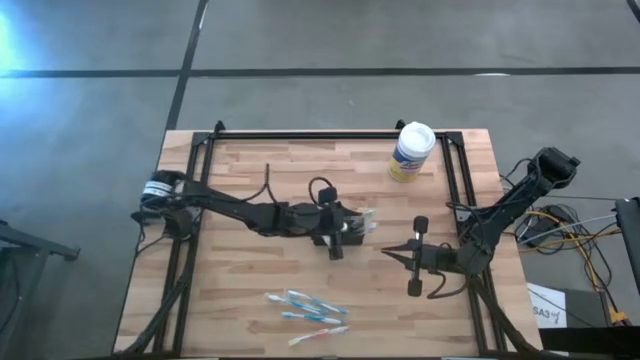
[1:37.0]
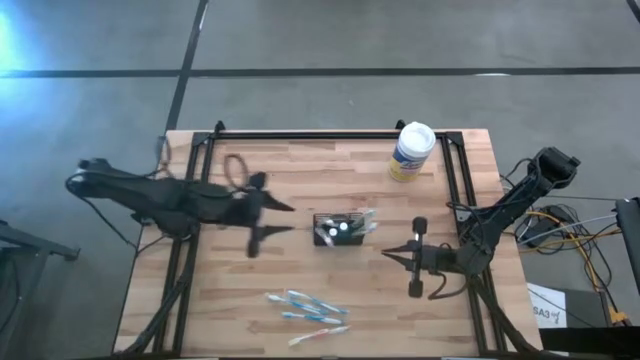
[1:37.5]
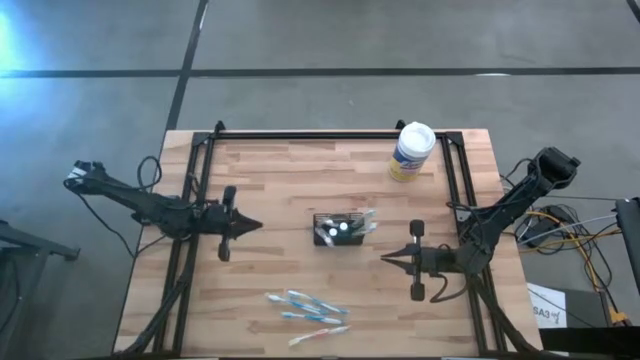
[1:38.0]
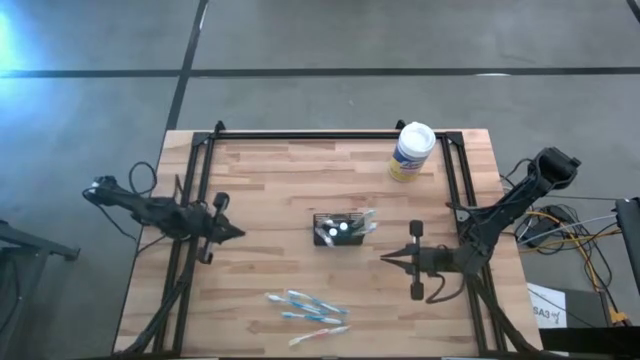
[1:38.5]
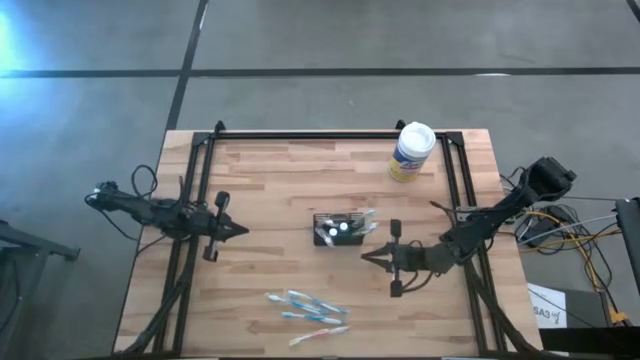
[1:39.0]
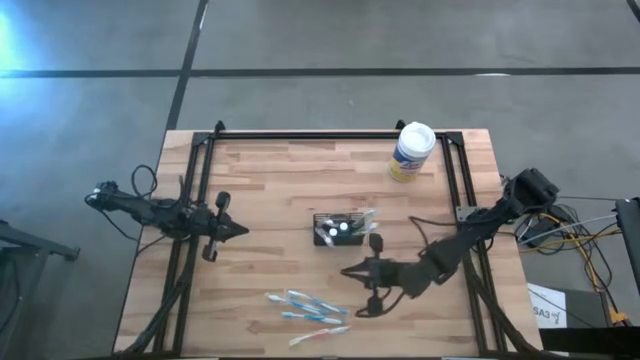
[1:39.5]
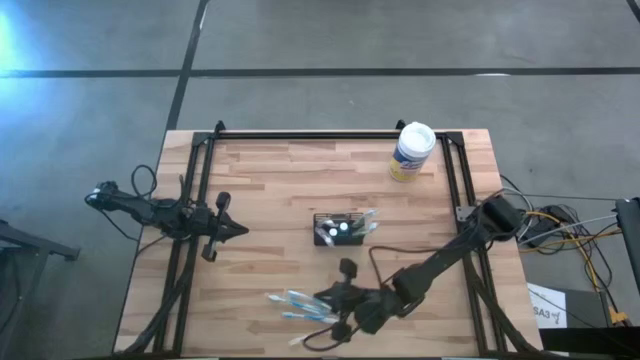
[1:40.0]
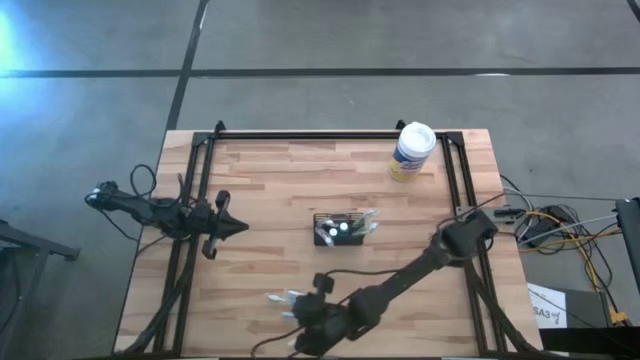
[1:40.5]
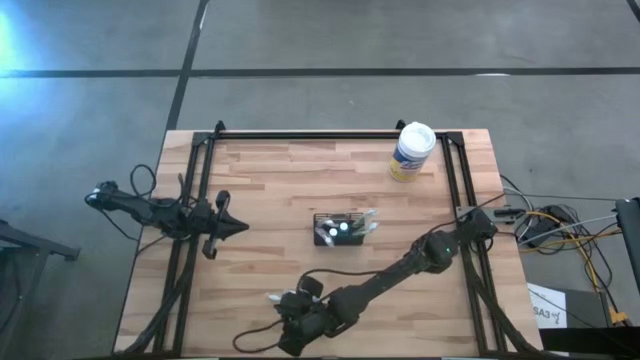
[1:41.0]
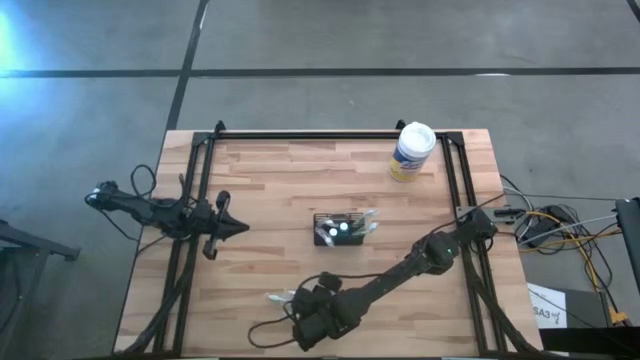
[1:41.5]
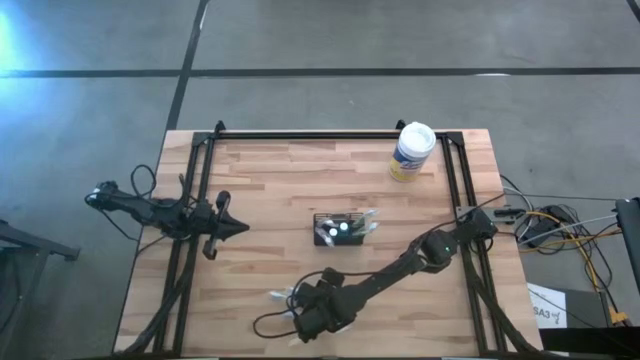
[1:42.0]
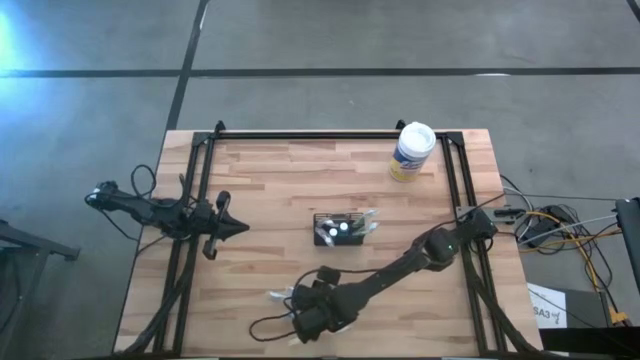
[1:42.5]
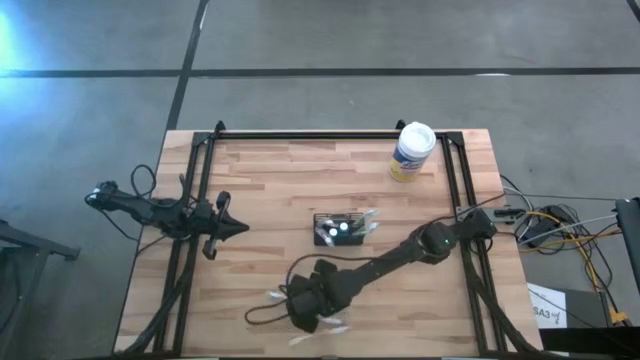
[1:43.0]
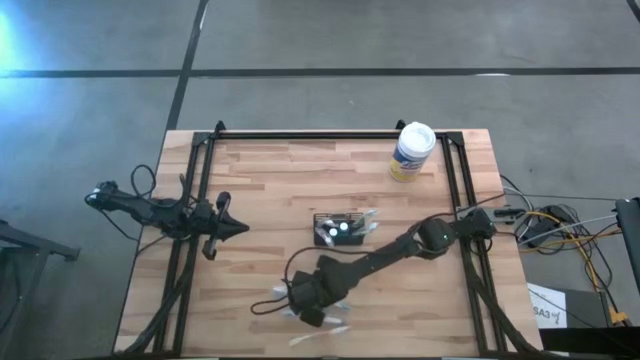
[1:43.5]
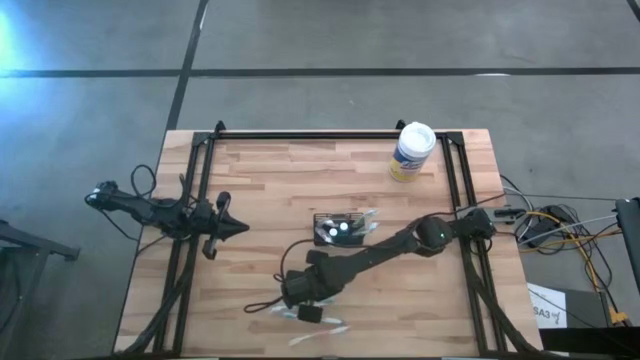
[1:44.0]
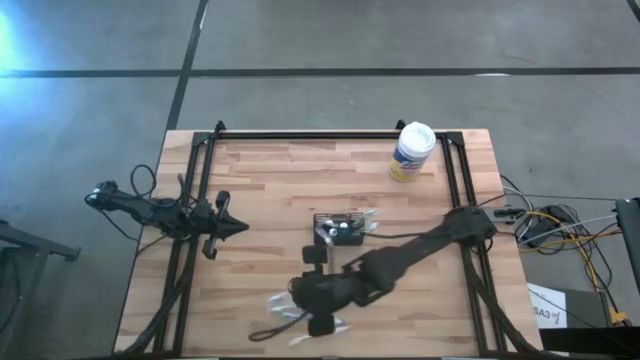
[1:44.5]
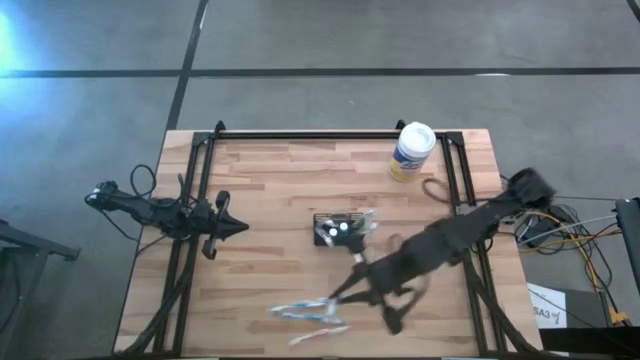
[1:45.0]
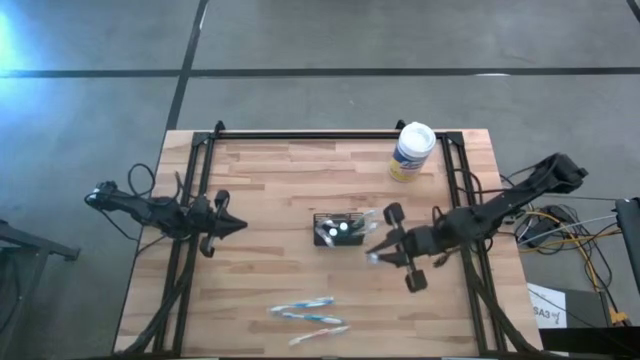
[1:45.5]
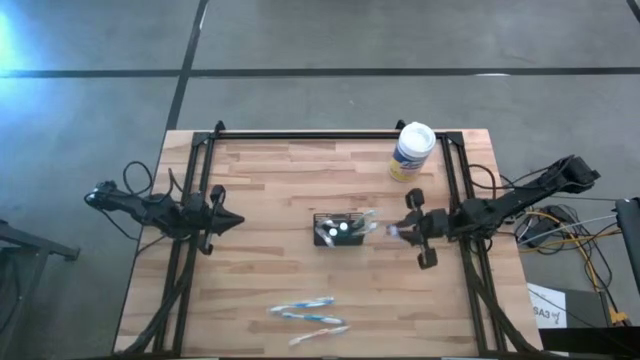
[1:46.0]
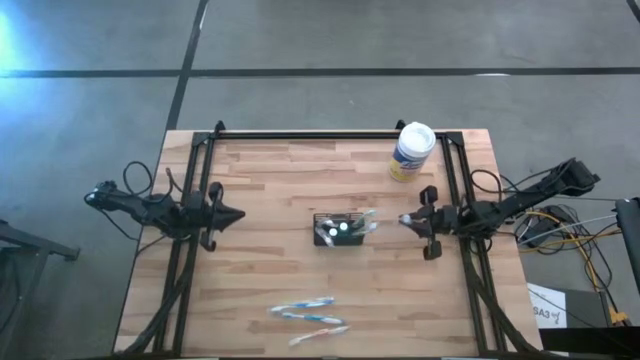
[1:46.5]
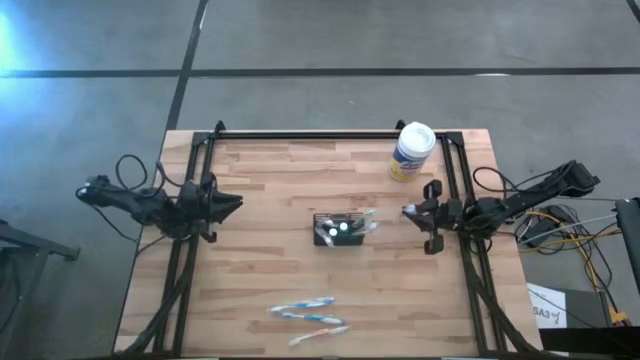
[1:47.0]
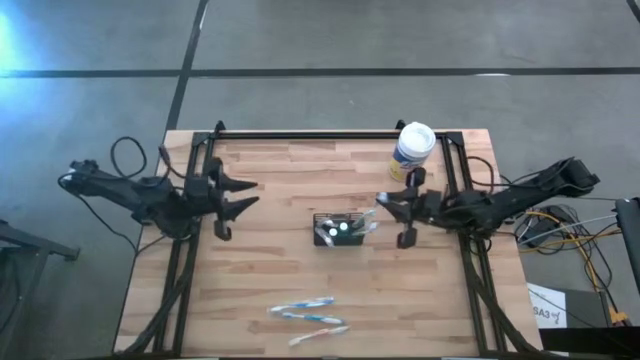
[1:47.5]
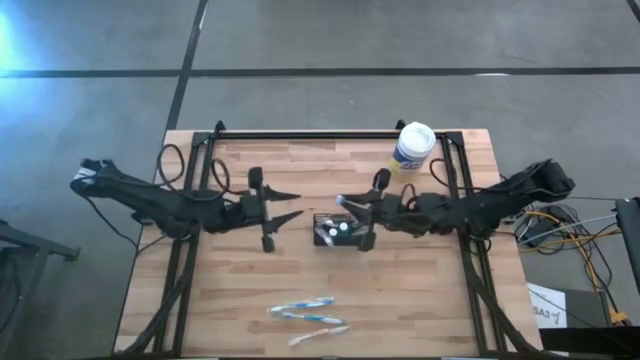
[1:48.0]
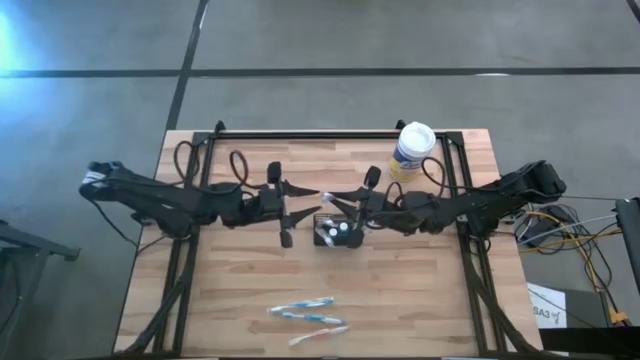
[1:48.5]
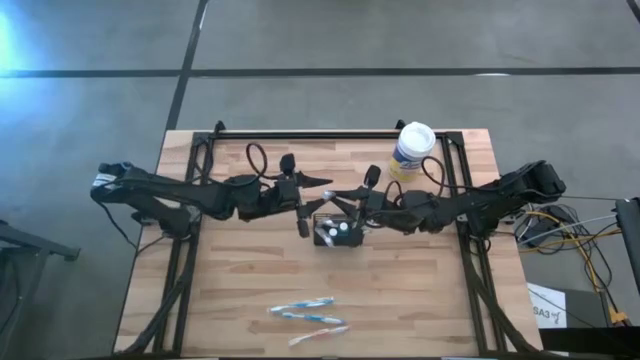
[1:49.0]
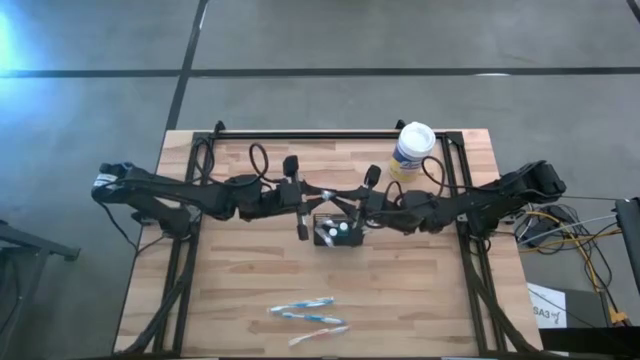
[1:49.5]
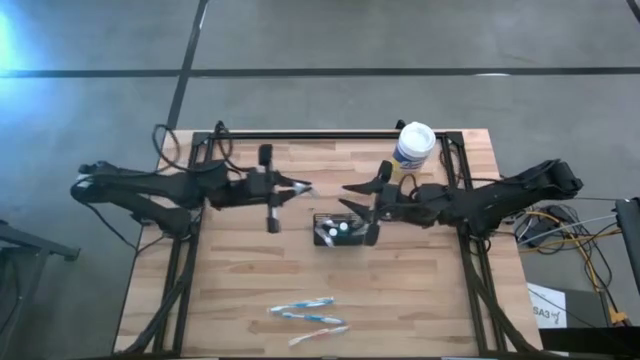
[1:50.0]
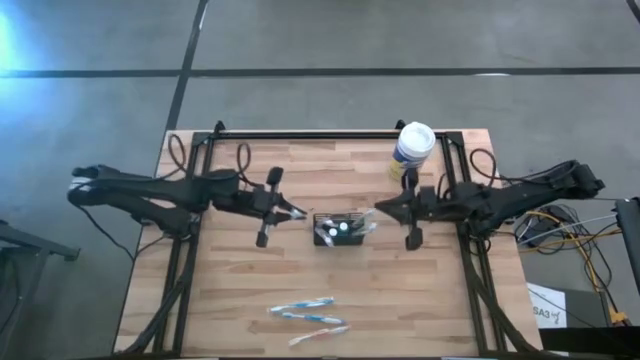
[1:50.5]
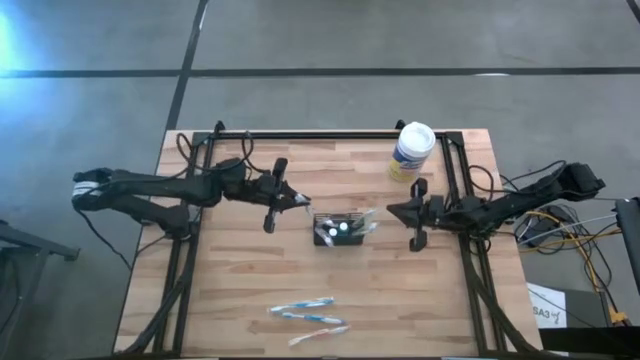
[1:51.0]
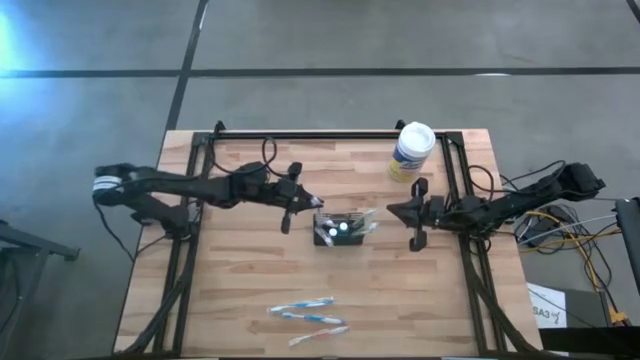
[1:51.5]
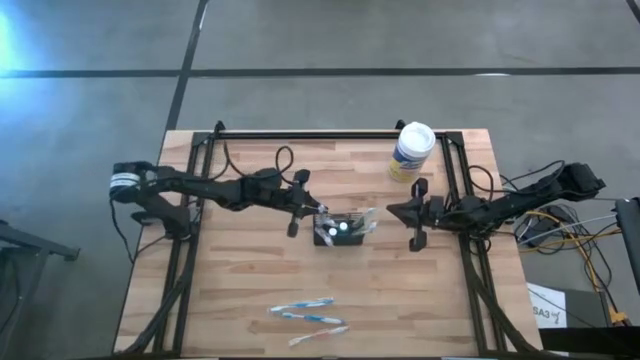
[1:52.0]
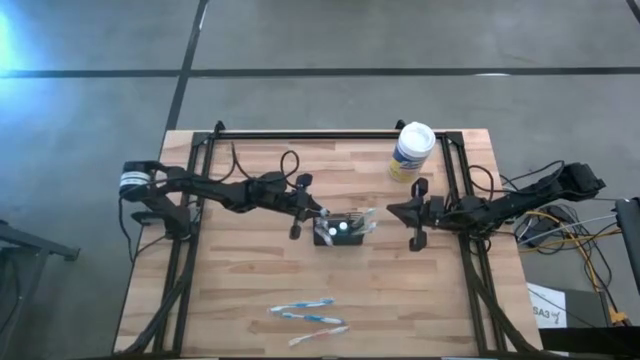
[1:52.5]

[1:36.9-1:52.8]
Task: Pick & Place toothbrushing station
Put the top blue toothbrush into the mesh organizer

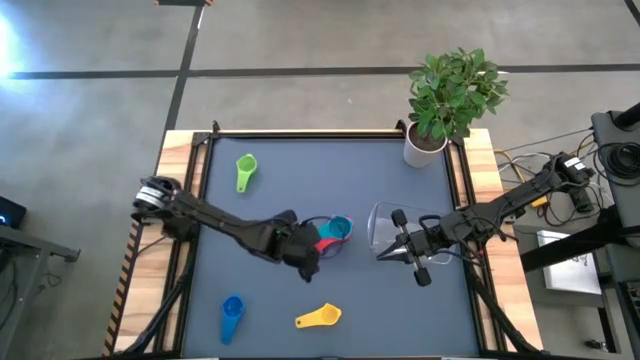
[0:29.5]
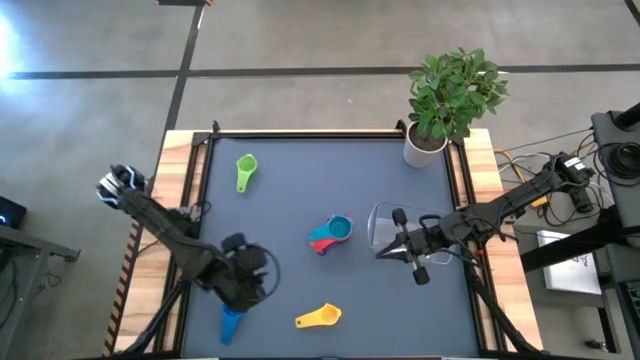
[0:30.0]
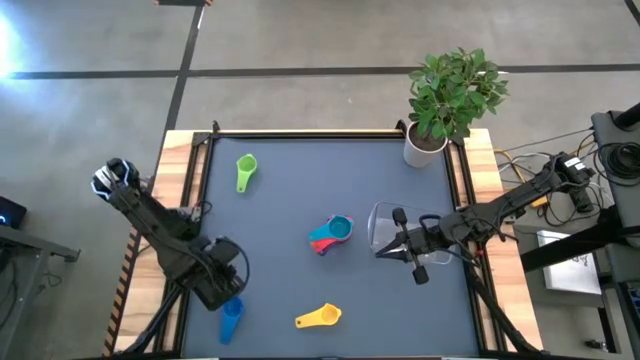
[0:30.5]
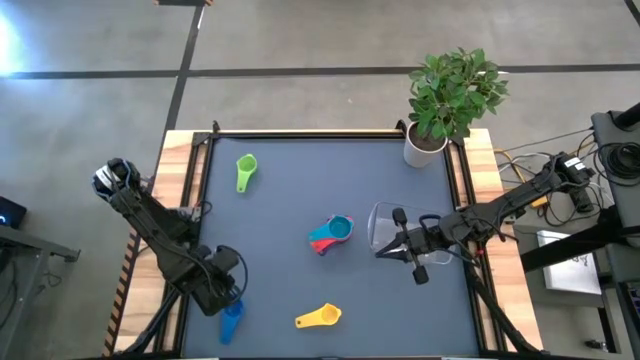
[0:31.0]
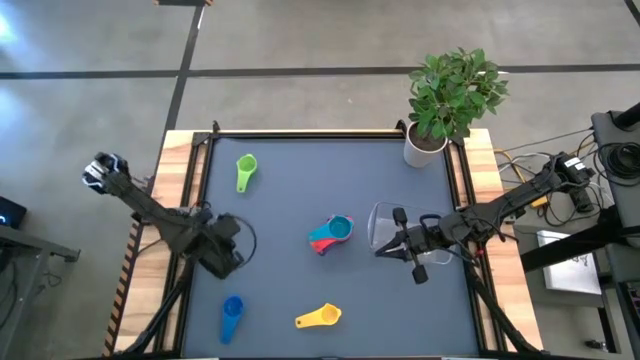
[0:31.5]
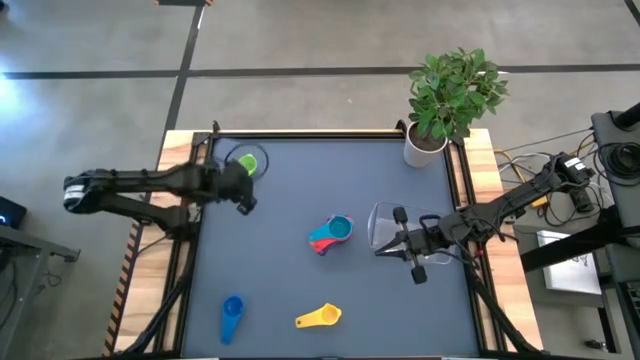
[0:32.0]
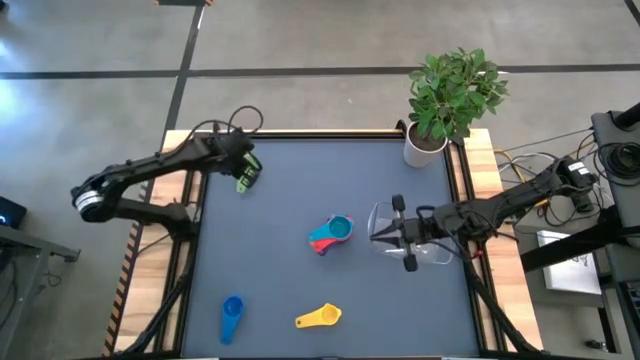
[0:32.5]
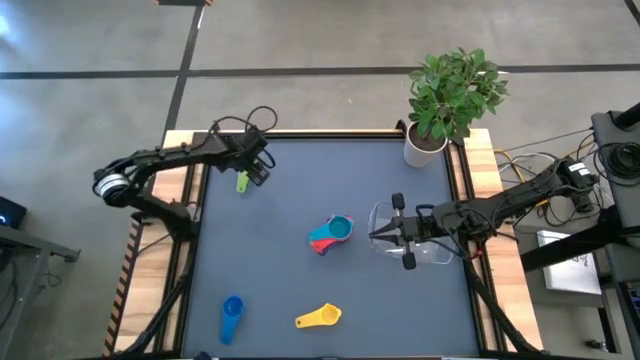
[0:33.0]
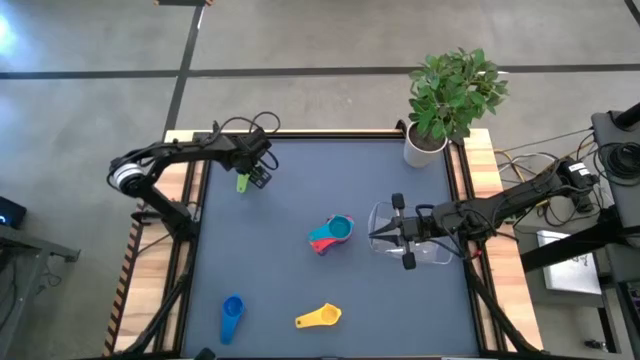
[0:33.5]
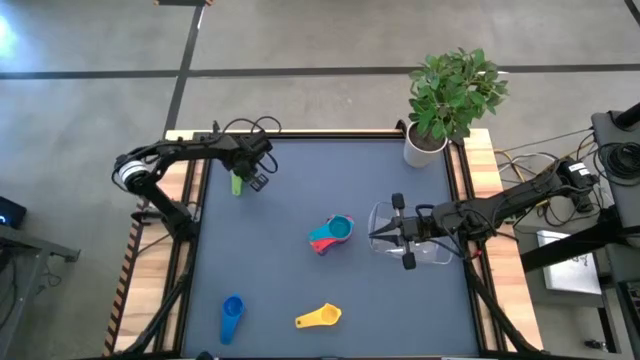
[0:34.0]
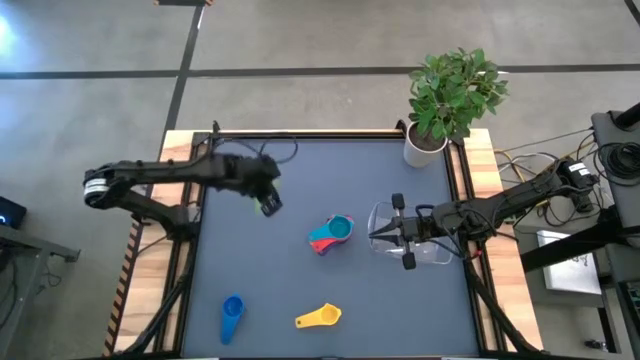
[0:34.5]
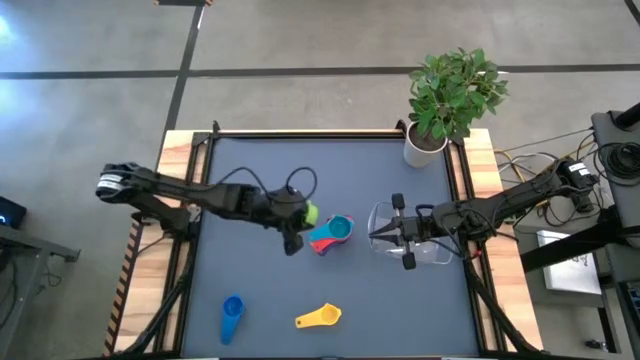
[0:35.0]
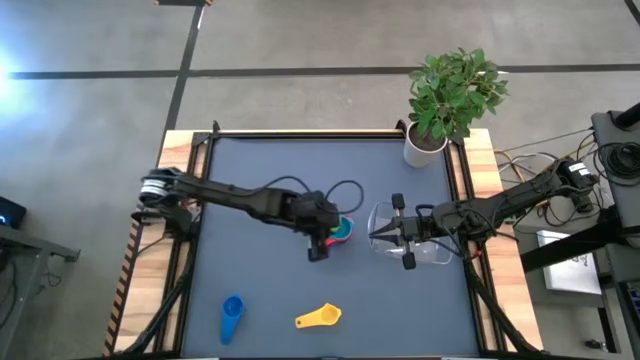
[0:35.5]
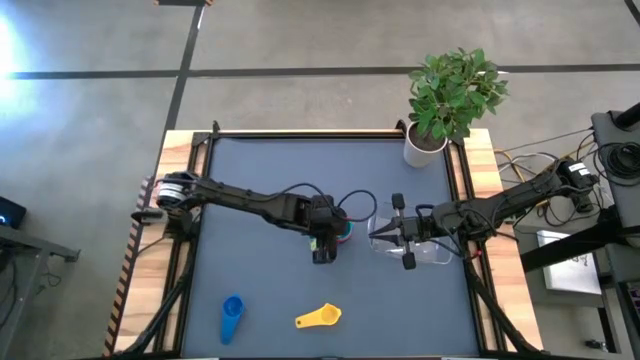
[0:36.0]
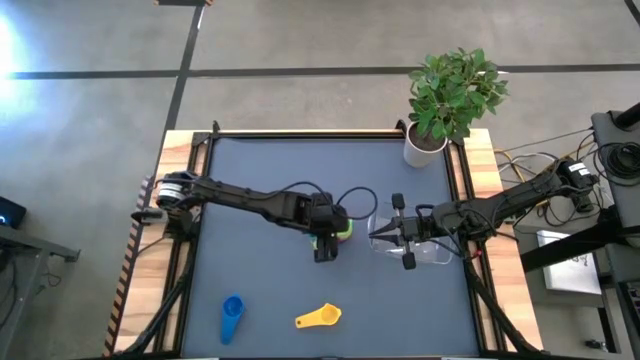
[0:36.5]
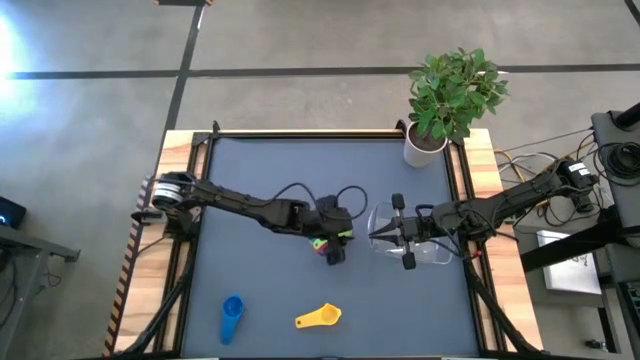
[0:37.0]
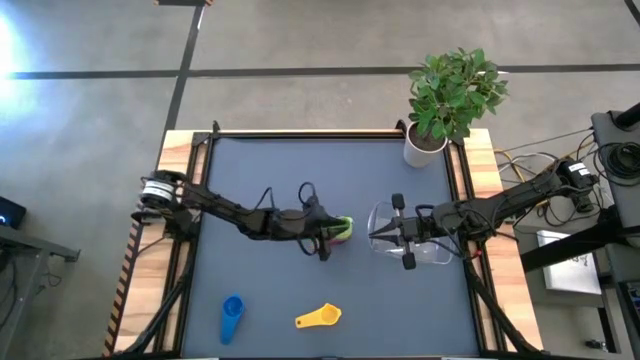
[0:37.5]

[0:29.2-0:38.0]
Task: Nest measuring cups in basket
Stack the green measuring cup on the light blue measuring cup
